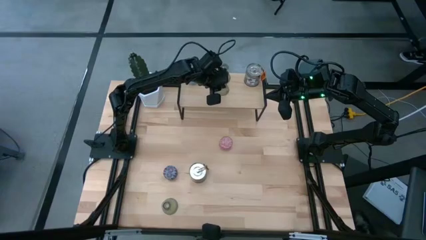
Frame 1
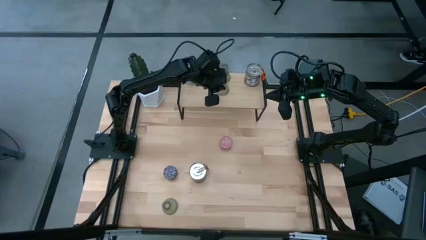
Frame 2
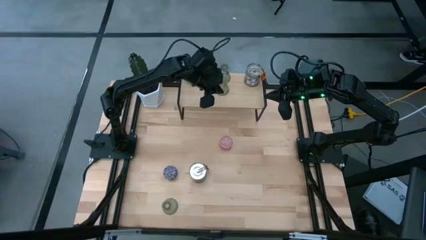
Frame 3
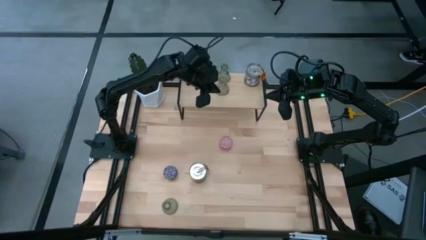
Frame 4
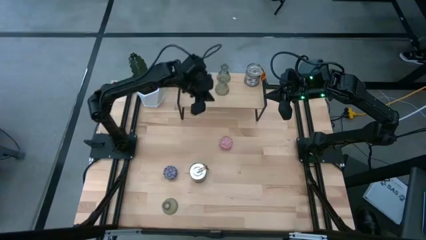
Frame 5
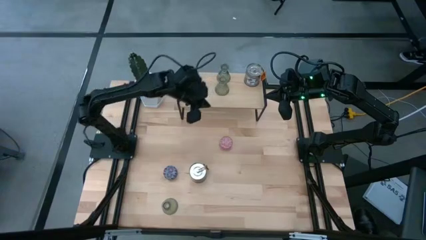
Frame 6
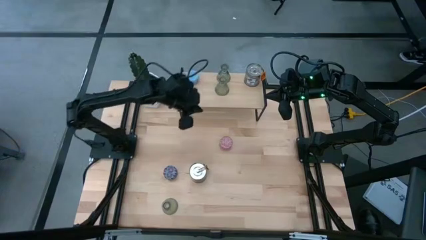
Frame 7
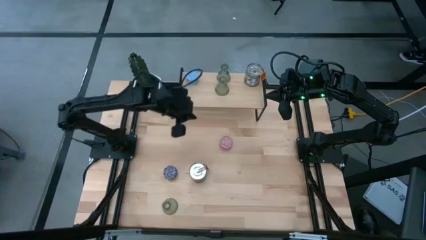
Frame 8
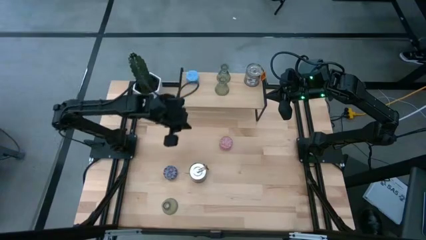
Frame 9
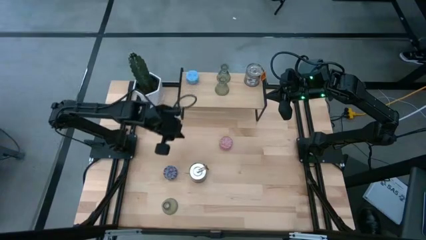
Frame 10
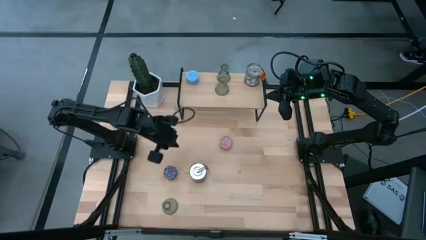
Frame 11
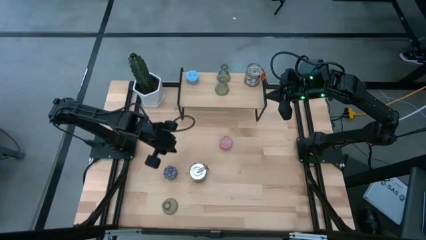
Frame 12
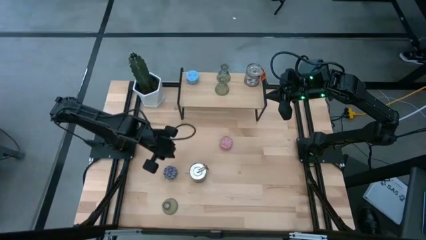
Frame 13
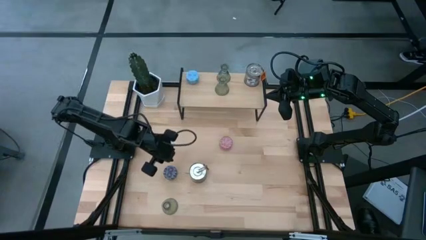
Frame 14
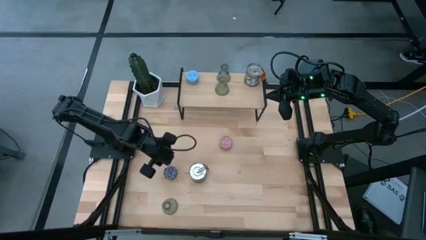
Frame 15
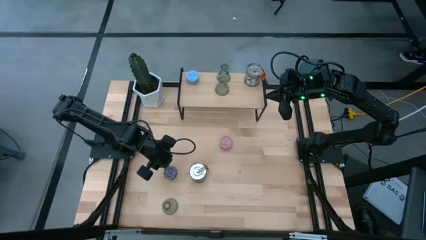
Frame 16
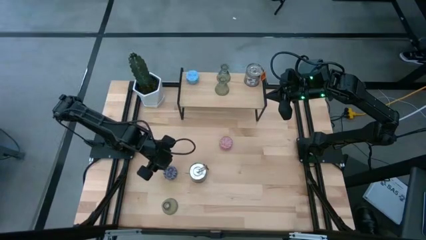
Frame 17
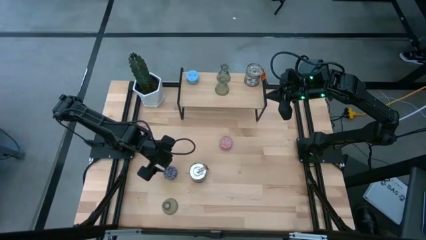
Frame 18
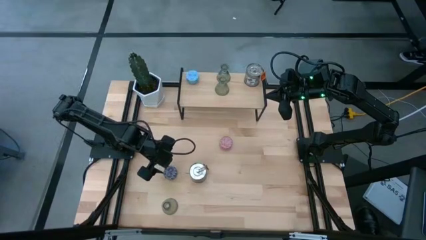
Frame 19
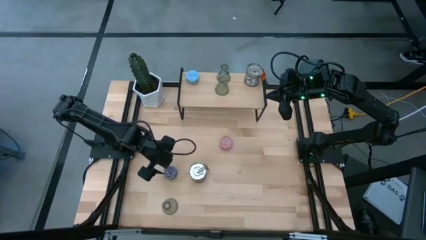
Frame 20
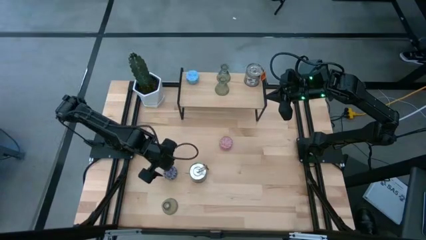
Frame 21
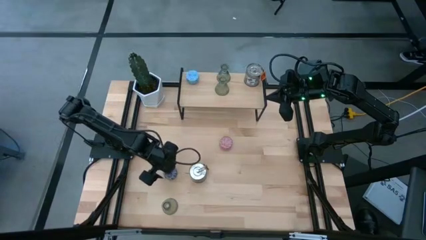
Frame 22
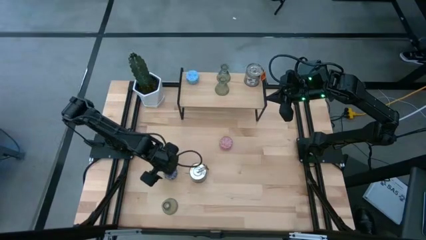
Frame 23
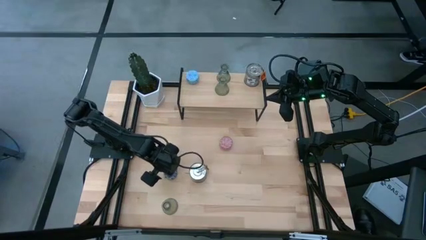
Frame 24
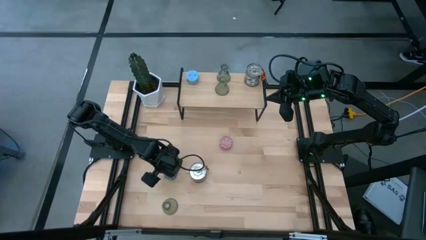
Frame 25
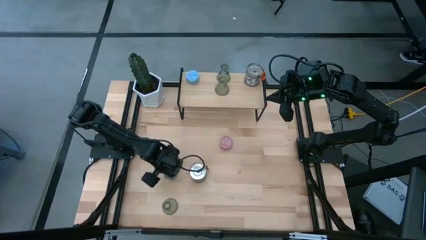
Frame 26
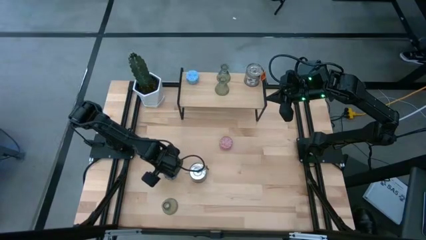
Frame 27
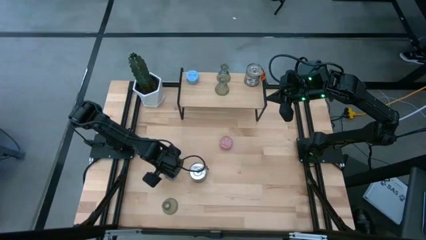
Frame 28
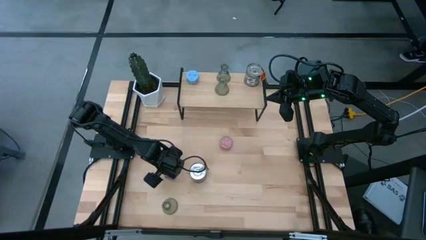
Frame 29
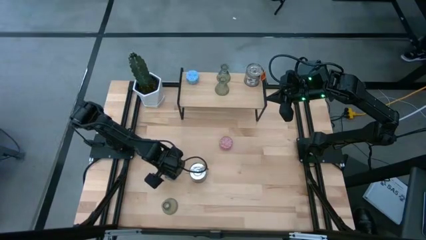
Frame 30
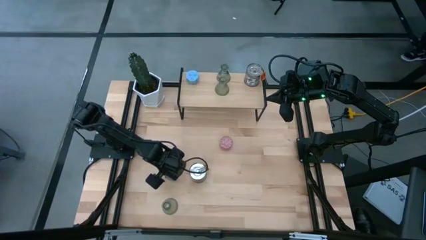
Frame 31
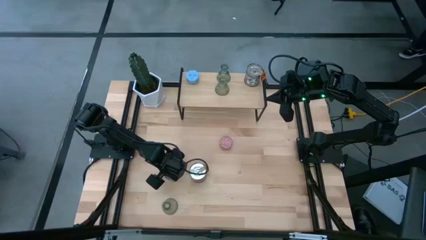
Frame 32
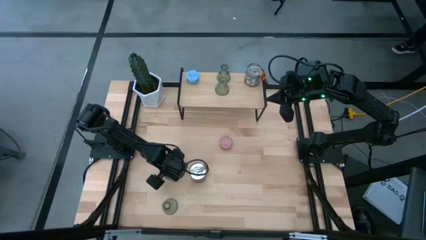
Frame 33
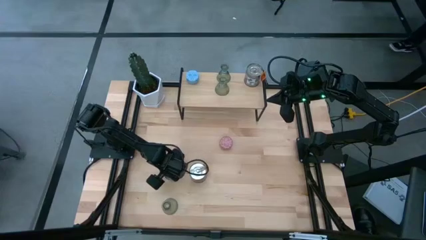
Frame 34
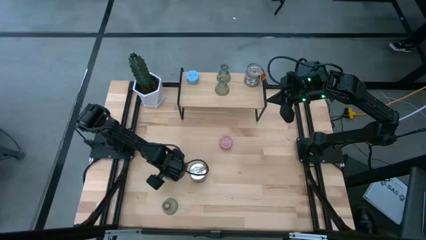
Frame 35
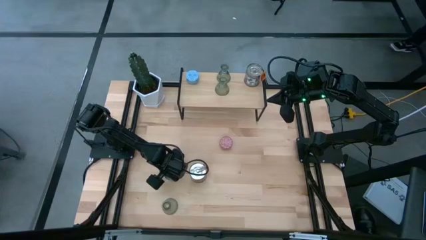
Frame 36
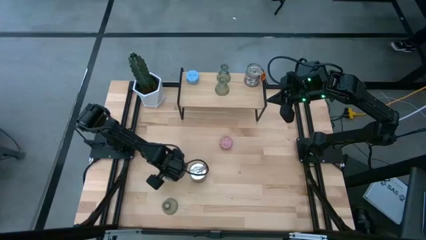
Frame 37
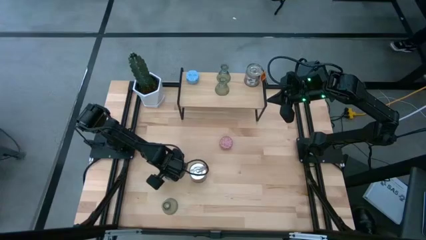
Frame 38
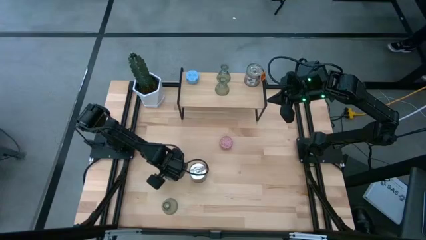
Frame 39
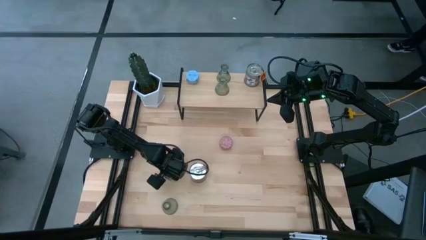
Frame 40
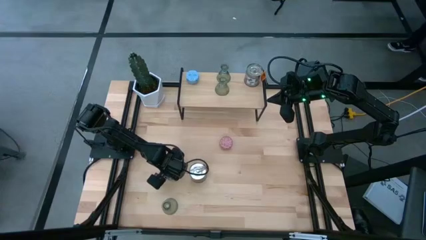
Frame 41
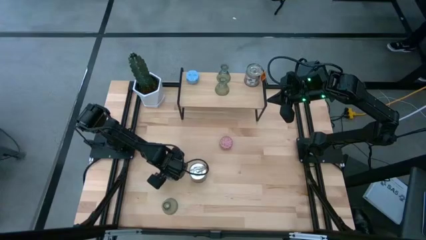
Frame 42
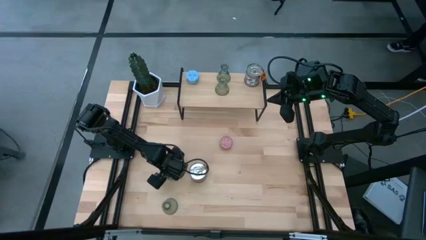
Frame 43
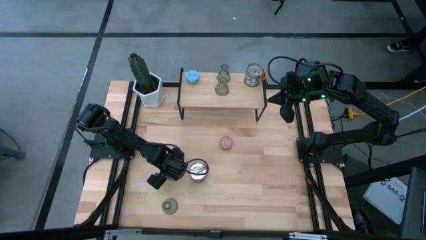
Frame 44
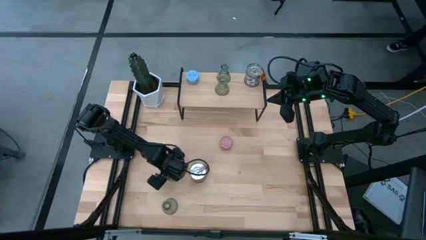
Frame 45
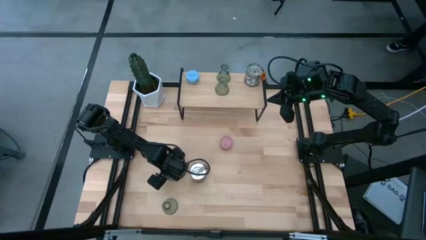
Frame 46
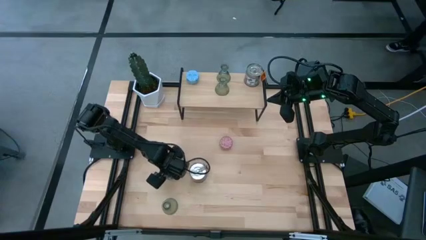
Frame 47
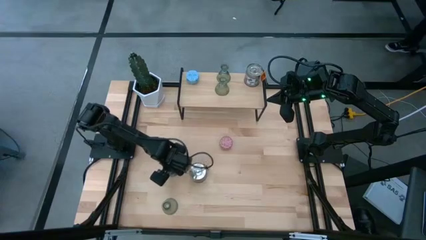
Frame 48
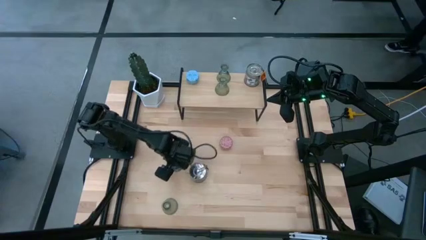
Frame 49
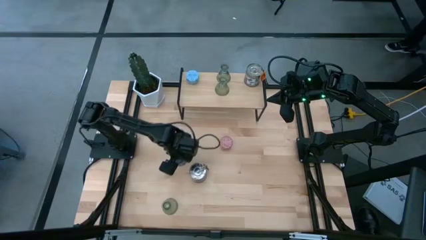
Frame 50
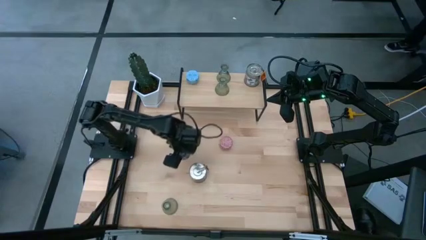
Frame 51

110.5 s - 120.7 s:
Task: Pick & Place candle stick holders
Put the red scented candle aligned with the blue scented candle on the shelf
